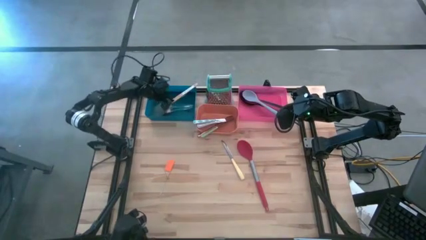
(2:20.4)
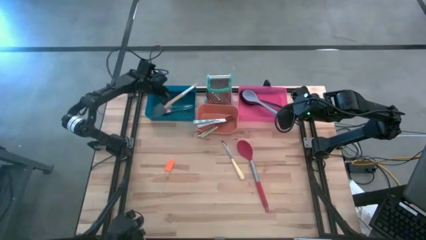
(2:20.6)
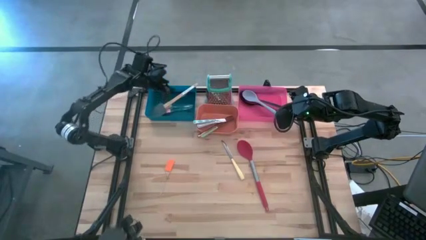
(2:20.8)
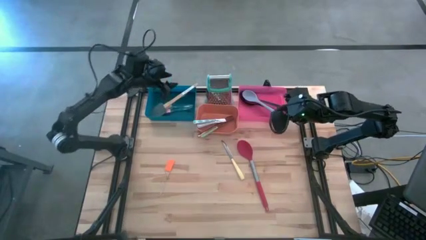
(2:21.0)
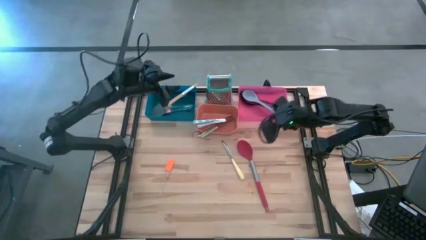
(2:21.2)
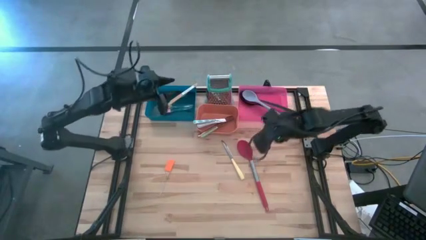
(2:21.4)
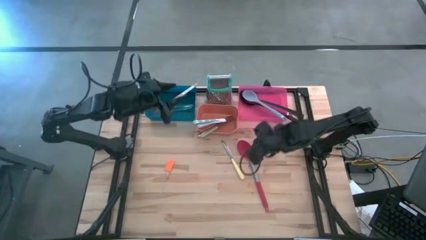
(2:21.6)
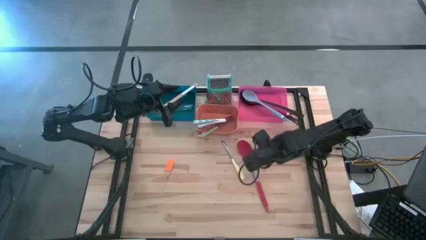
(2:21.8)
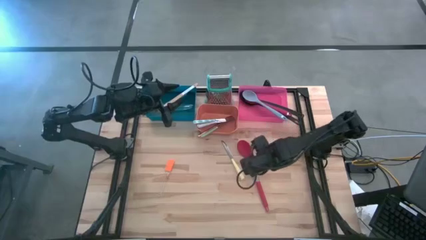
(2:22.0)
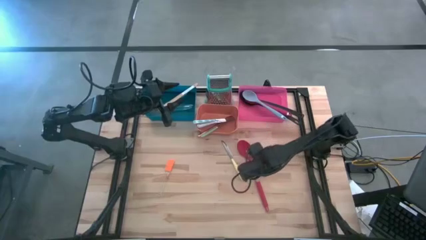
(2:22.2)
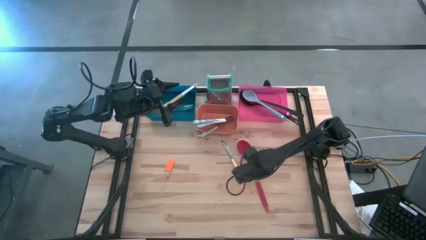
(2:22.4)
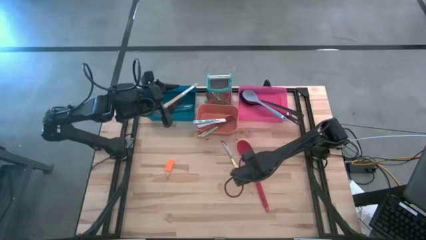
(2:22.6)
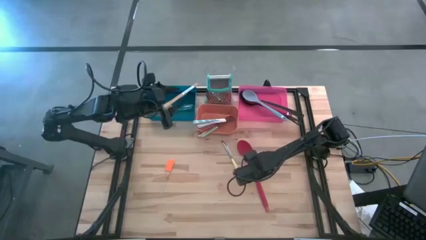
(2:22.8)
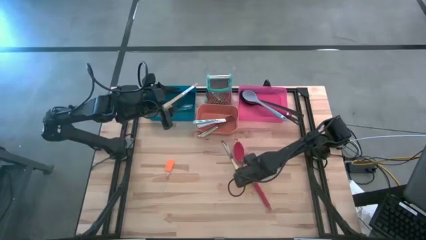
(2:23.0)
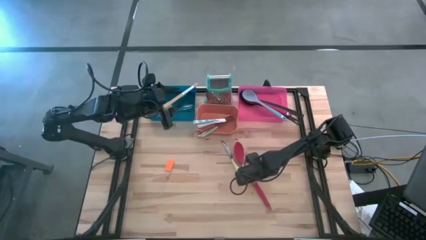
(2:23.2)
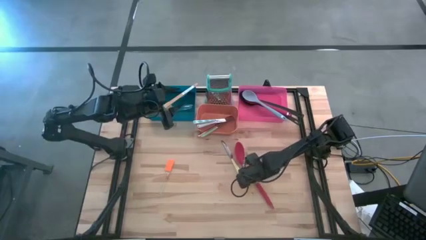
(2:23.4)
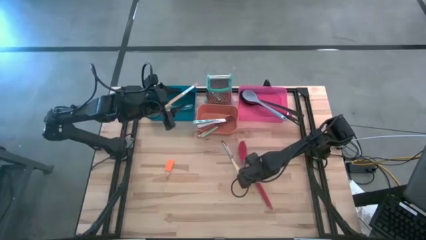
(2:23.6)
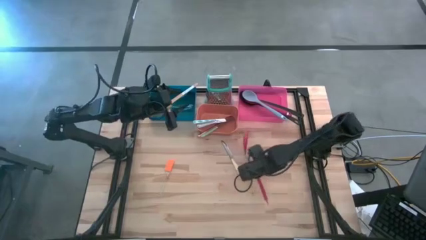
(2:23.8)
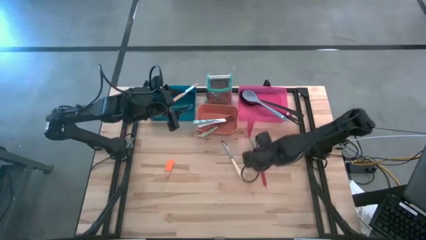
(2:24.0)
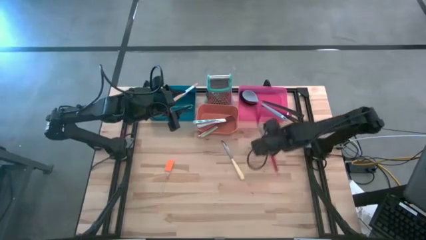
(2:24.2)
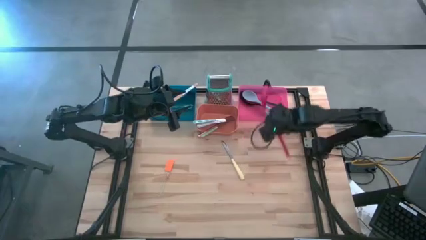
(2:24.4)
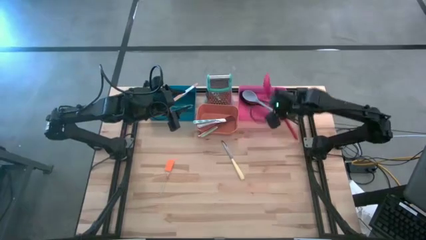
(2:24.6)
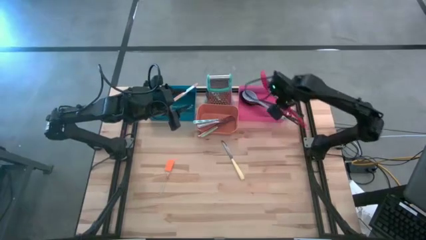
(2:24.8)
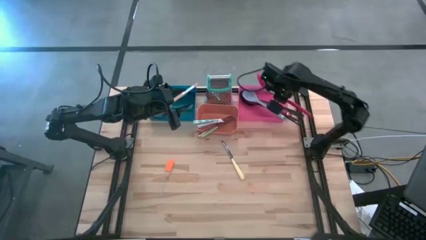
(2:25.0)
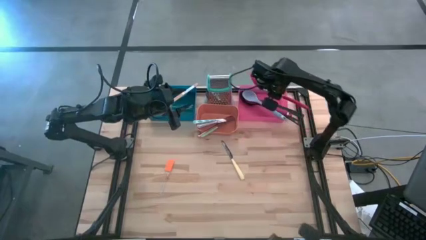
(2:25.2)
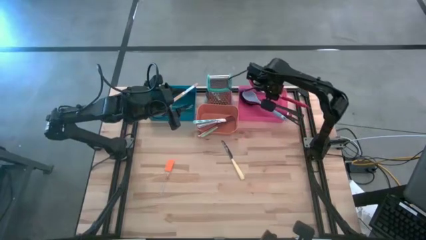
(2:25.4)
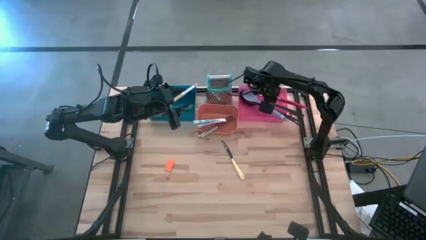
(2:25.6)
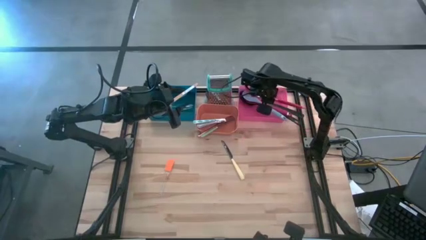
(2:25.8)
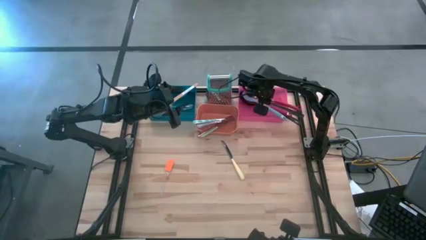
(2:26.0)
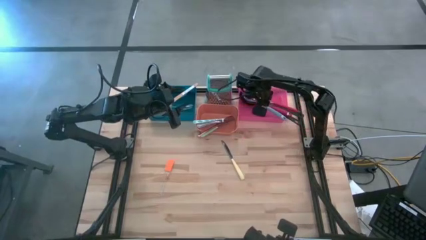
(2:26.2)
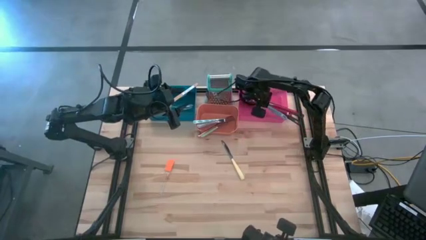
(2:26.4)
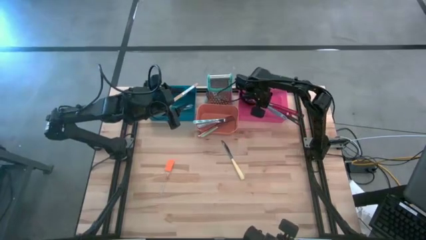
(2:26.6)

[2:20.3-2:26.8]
Task: Pick & Place Kitchen Items
Put the red silver ladle scoop into the pink bin

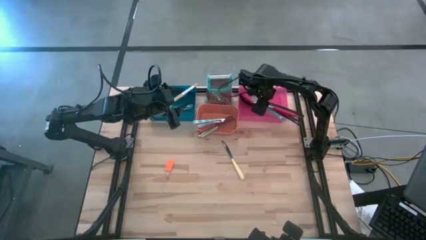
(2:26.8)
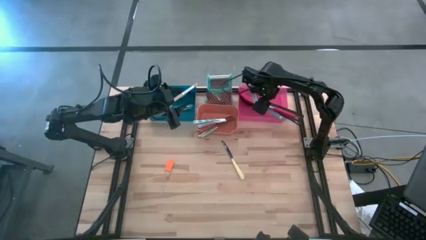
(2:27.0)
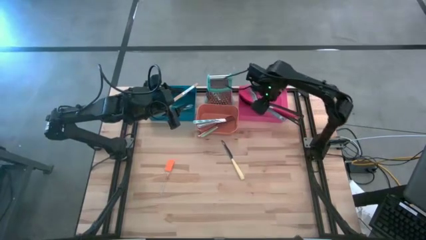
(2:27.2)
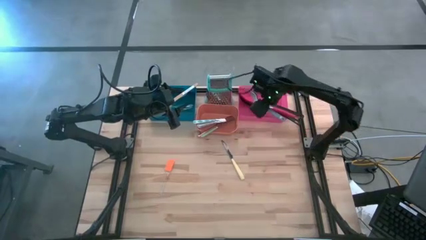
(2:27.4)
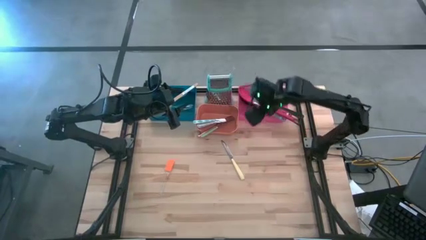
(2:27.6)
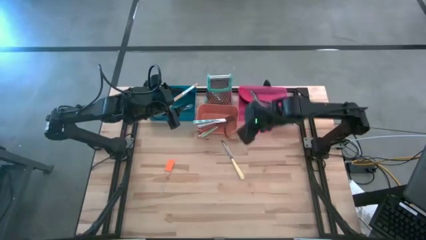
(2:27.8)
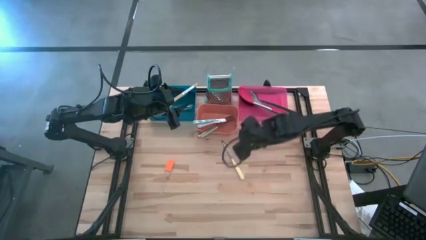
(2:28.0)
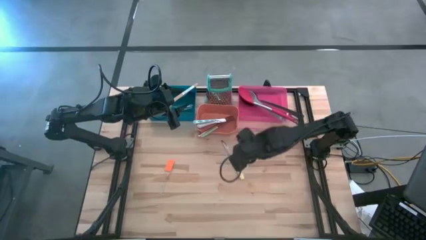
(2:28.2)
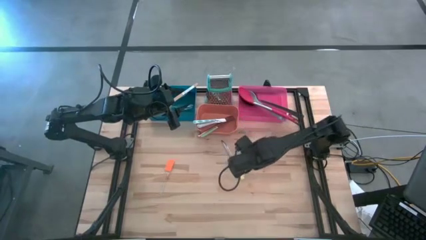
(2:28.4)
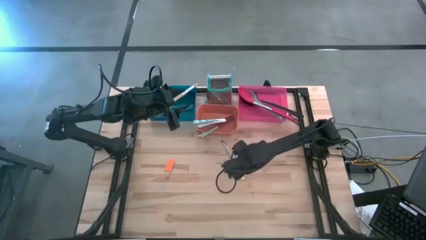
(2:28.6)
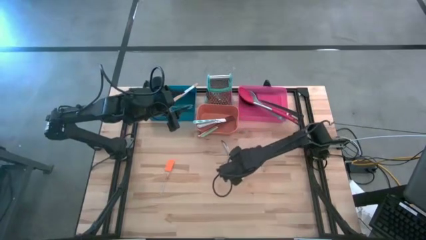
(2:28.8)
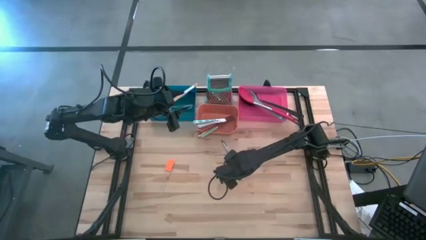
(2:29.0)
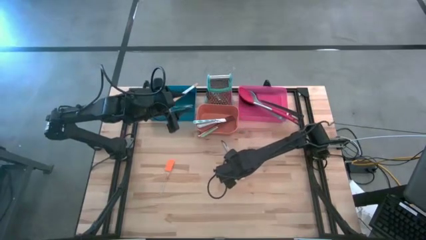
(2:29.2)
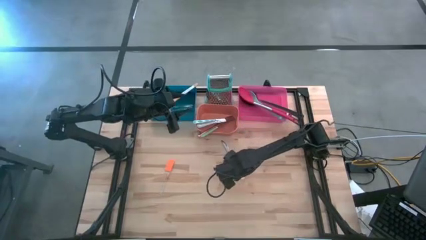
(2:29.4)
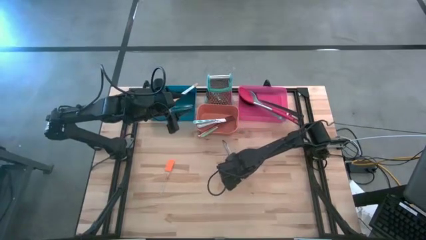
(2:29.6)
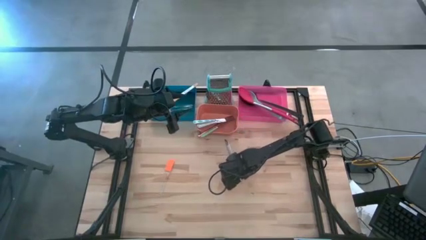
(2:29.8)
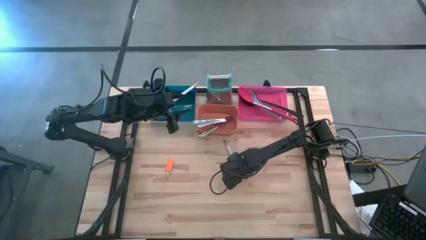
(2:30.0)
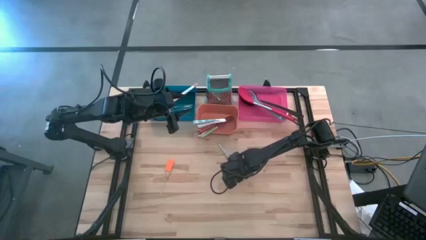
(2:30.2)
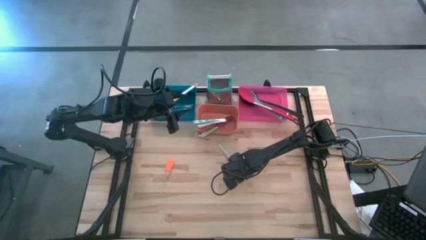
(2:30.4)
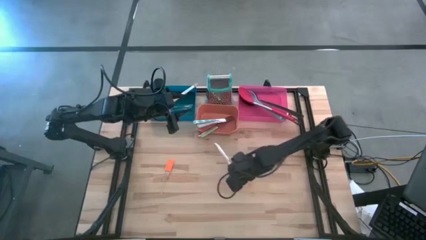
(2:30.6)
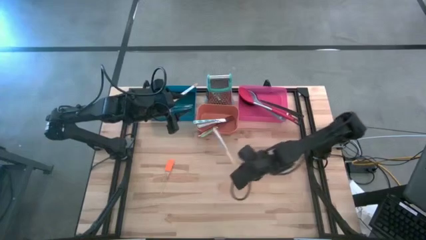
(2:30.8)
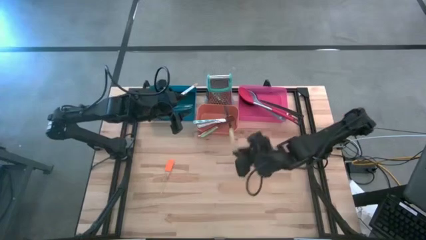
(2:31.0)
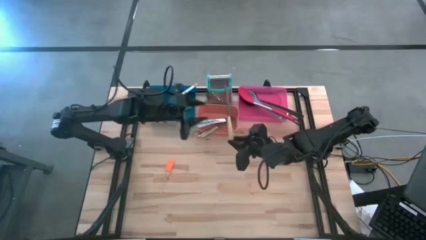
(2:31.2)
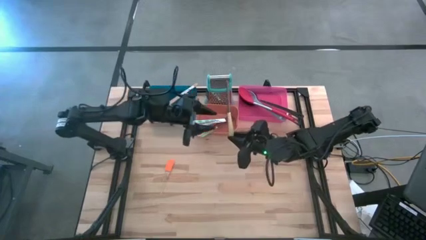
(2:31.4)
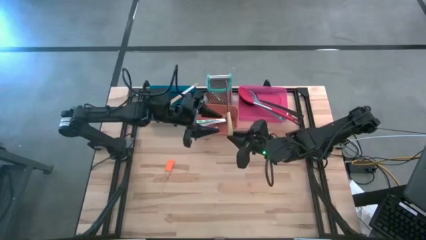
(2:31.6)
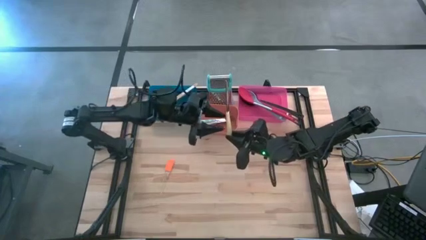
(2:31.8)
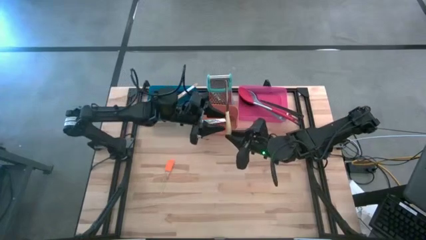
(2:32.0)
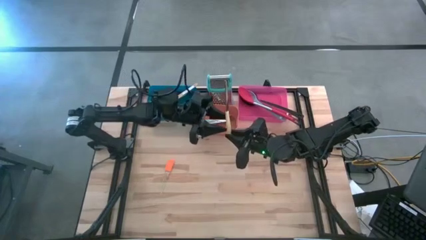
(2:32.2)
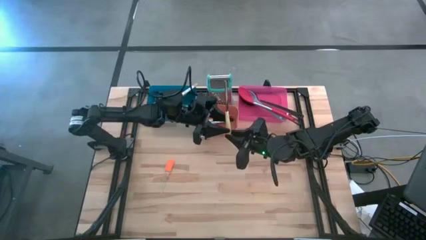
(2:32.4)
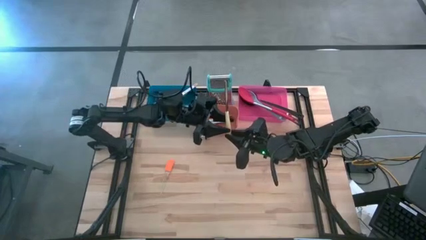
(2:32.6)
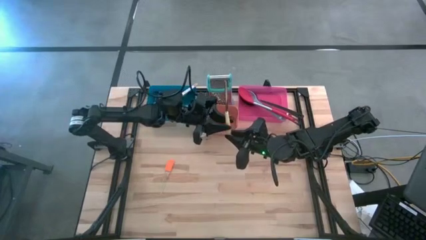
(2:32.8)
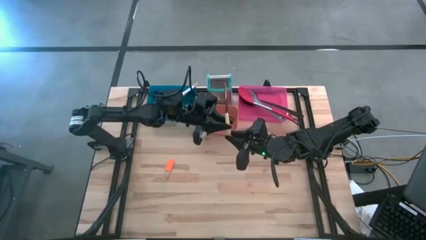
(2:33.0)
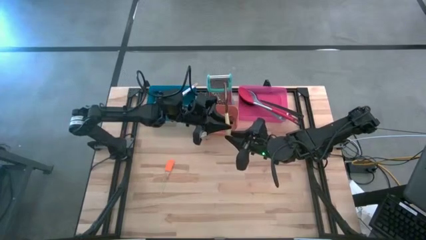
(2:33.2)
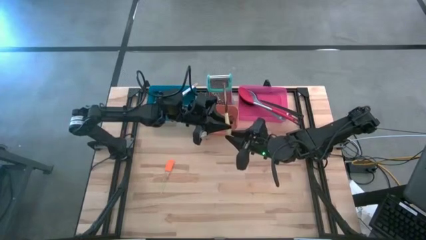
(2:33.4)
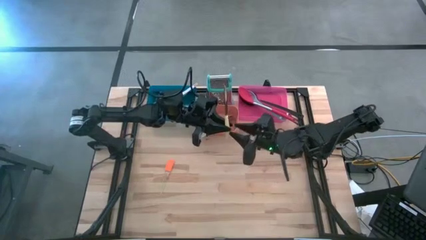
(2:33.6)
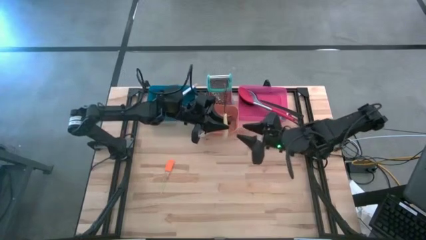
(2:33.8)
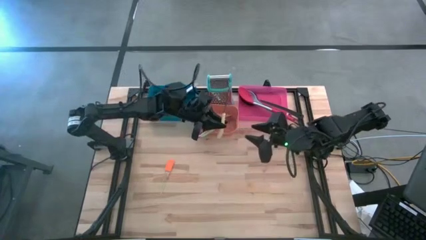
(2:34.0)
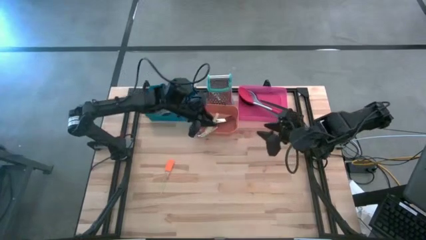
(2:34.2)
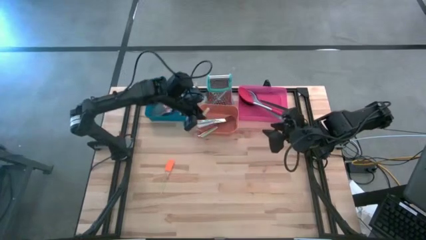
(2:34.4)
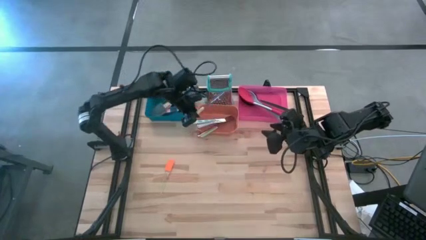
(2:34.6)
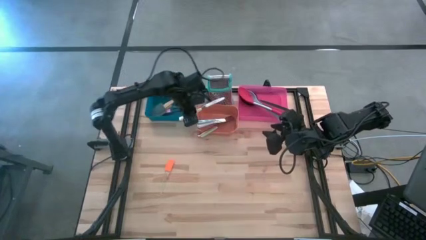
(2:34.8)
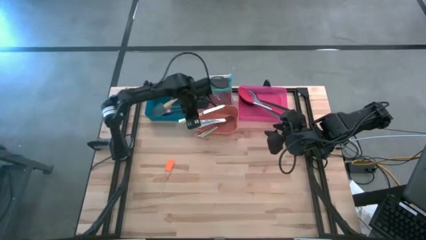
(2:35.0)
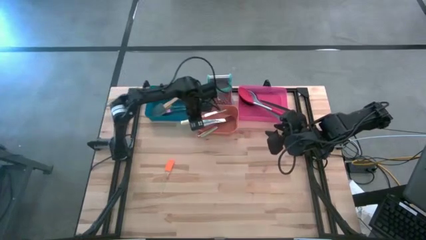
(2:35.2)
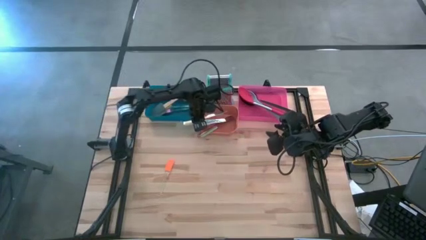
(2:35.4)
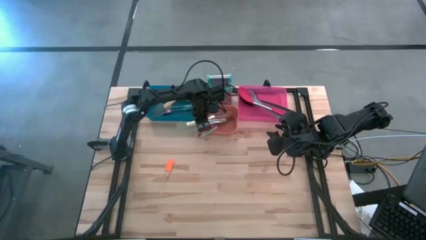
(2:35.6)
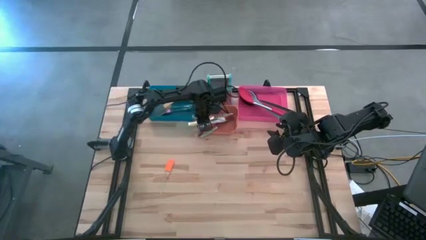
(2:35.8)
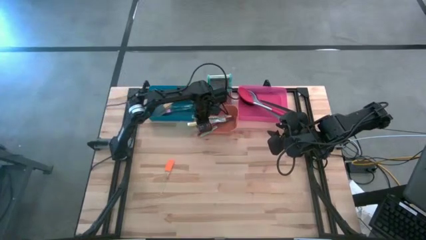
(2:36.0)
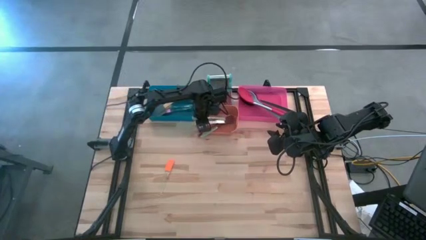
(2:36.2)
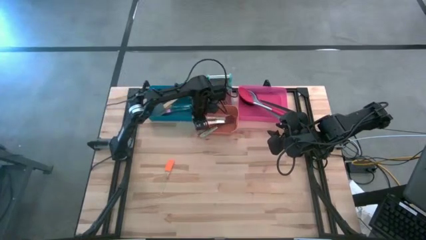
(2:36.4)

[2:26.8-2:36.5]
Put the yellow table knife into the brown bin

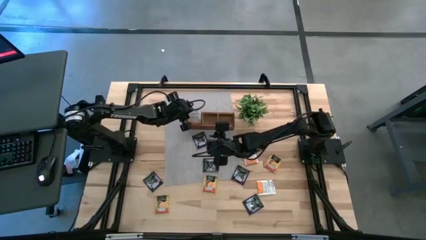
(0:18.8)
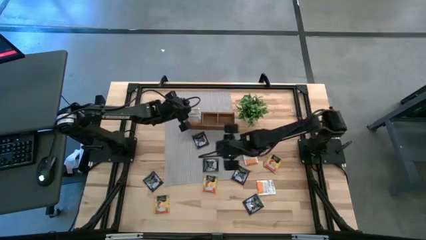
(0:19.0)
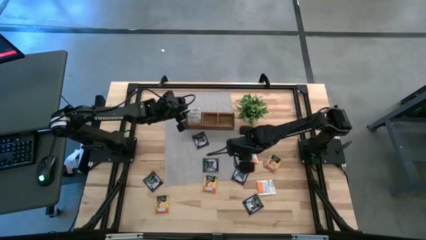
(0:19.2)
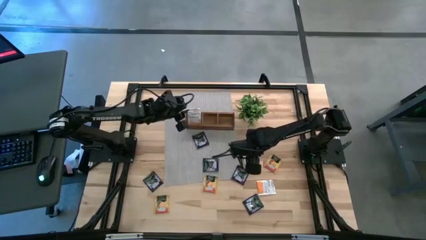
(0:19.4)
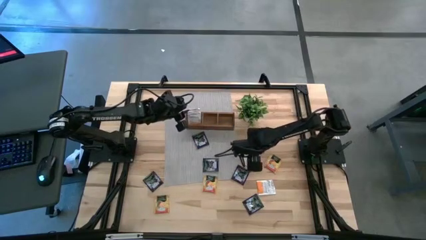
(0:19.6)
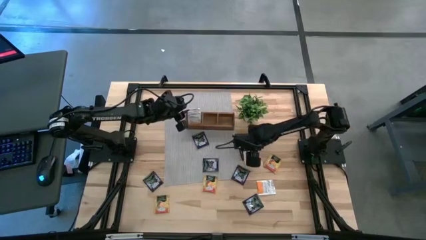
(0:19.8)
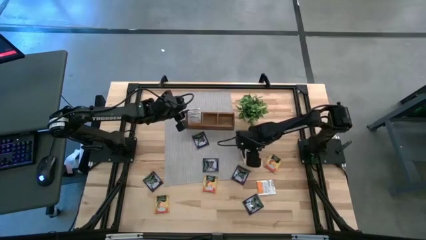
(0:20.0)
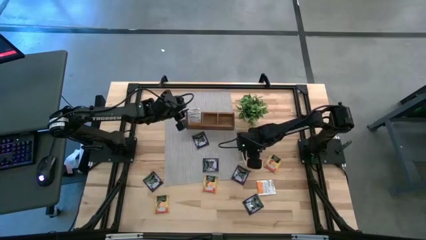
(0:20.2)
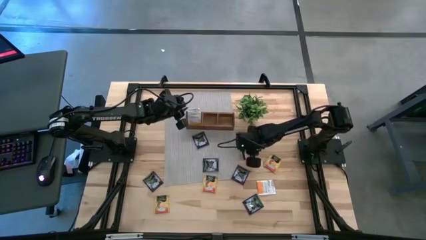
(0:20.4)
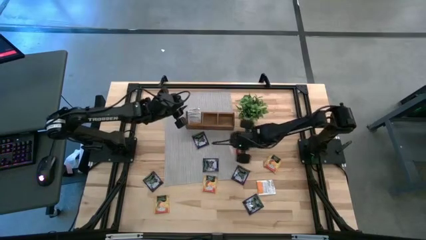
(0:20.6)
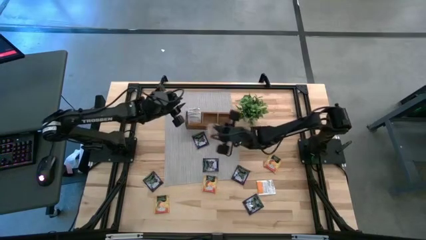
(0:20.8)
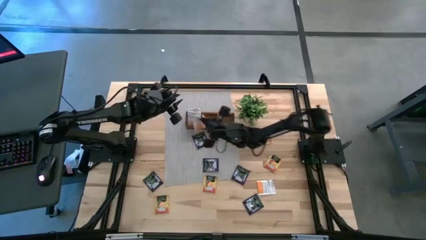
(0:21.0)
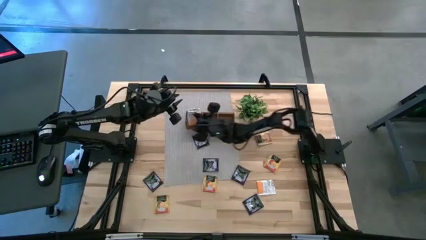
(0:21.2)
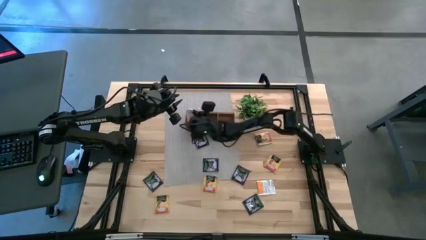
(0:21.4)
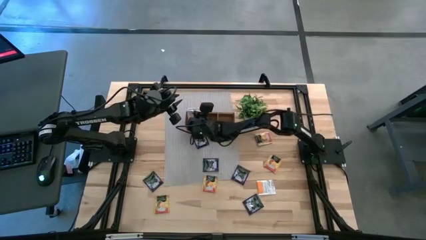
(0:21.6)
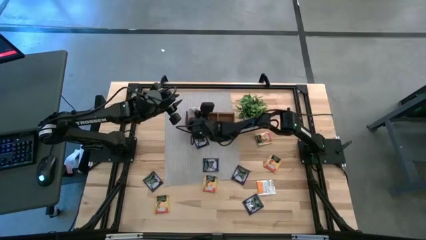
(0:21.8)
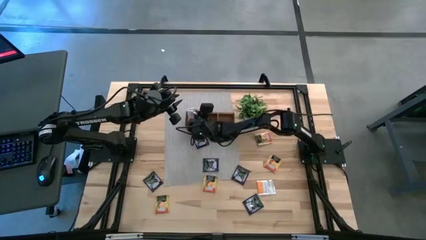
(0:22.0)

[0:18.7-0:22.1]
Task: Pick & Place Tea
Put the white tea bag in the left section of the brown wooden organizer
